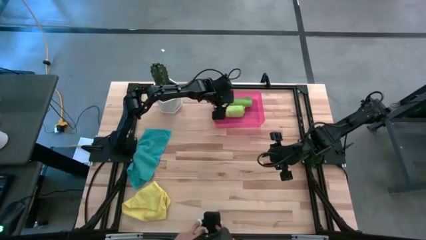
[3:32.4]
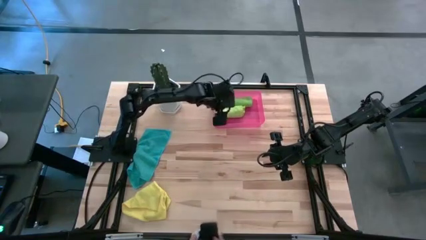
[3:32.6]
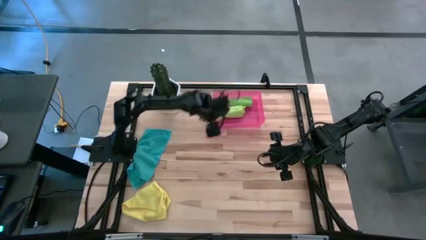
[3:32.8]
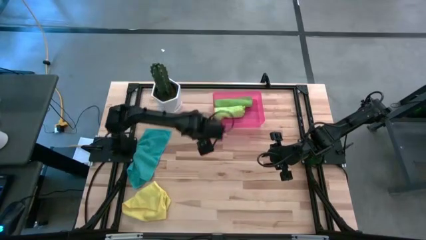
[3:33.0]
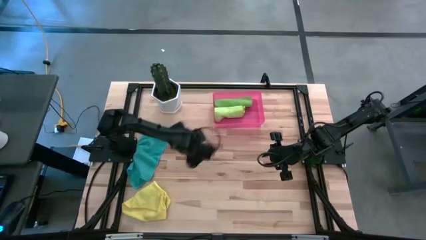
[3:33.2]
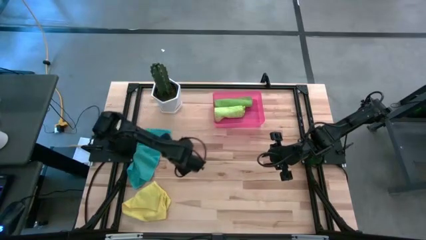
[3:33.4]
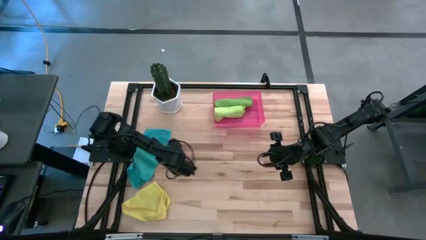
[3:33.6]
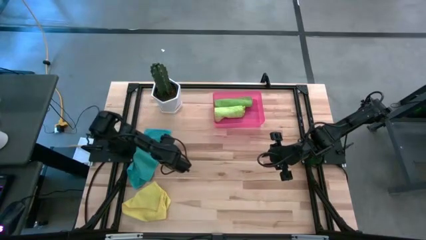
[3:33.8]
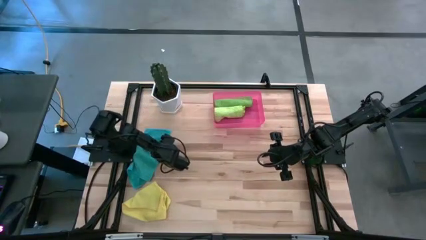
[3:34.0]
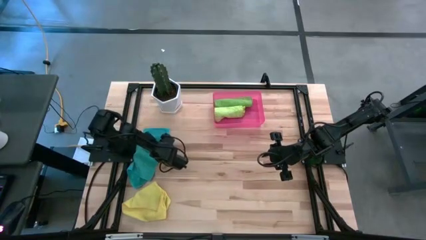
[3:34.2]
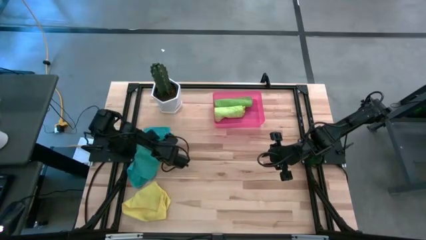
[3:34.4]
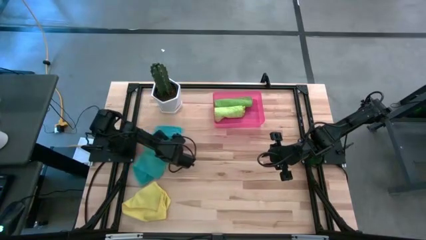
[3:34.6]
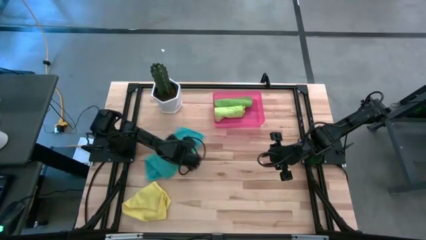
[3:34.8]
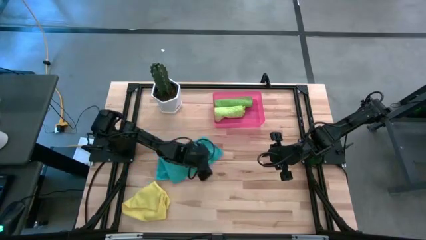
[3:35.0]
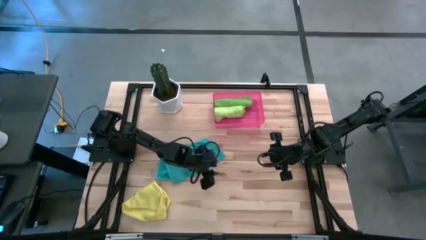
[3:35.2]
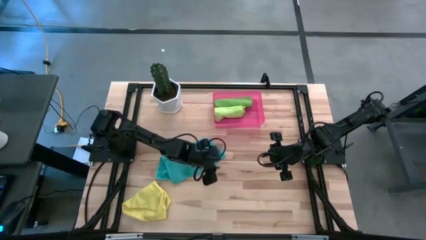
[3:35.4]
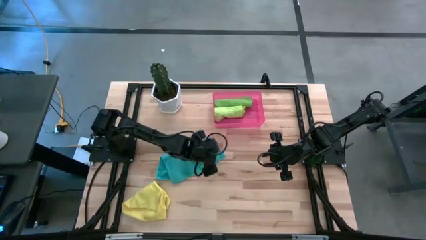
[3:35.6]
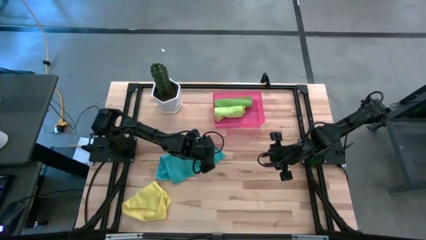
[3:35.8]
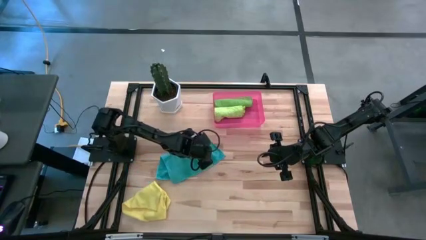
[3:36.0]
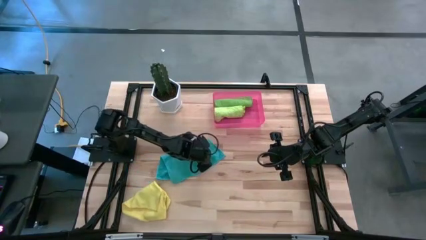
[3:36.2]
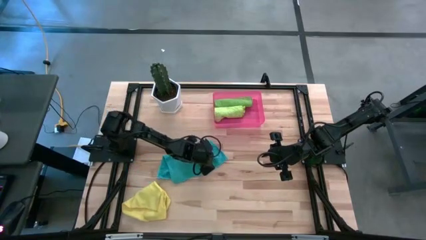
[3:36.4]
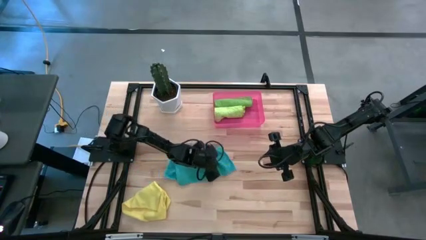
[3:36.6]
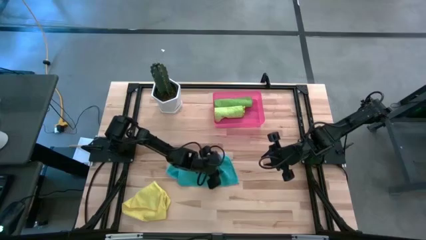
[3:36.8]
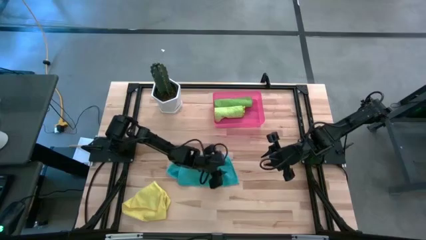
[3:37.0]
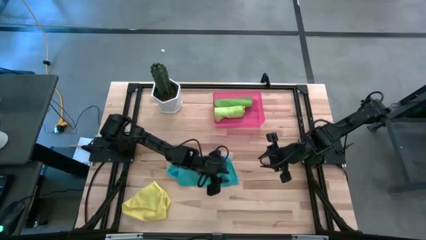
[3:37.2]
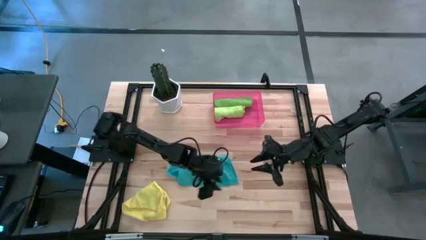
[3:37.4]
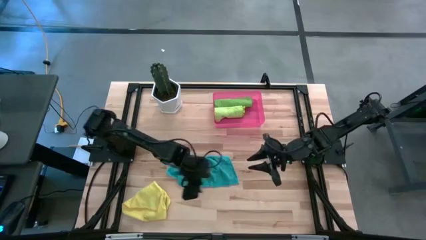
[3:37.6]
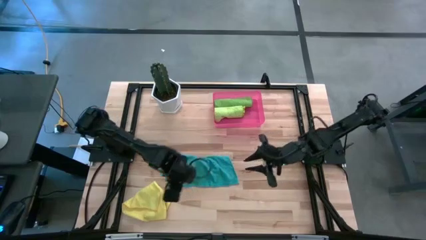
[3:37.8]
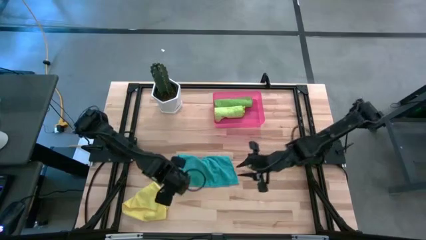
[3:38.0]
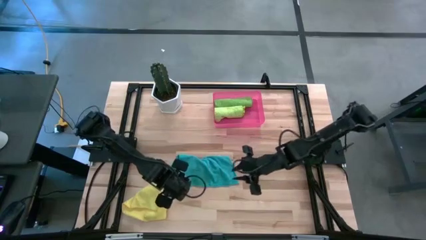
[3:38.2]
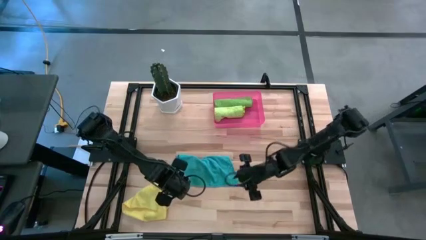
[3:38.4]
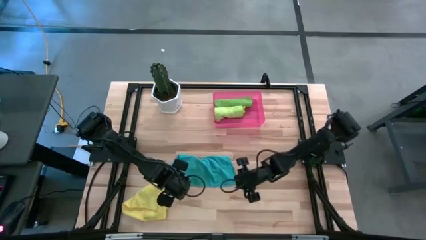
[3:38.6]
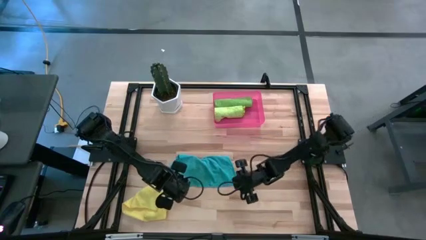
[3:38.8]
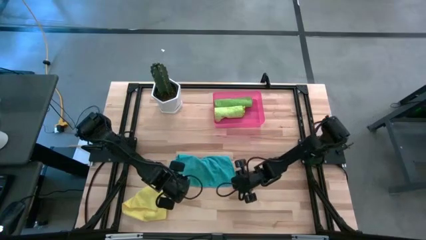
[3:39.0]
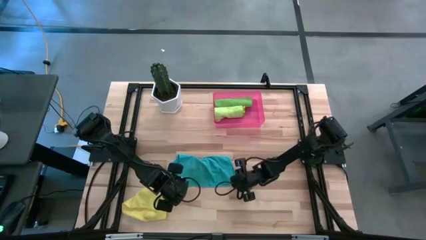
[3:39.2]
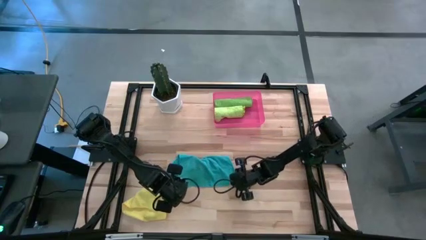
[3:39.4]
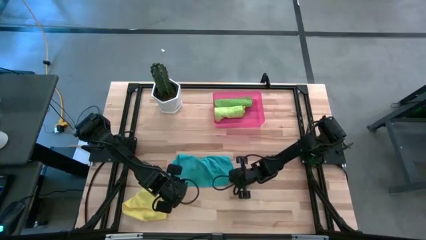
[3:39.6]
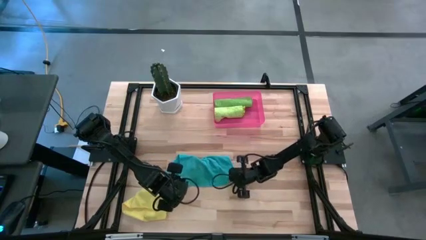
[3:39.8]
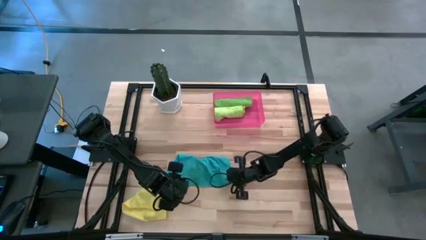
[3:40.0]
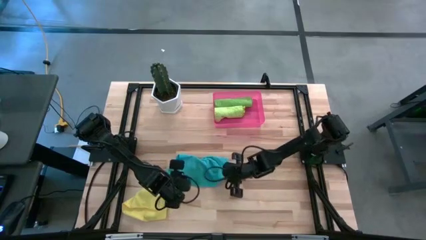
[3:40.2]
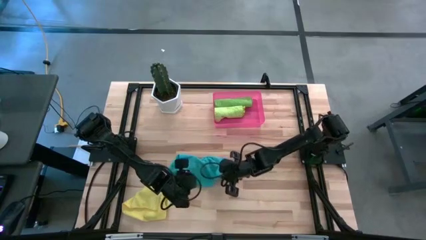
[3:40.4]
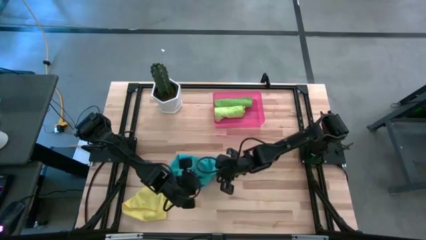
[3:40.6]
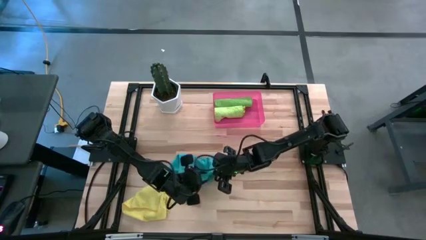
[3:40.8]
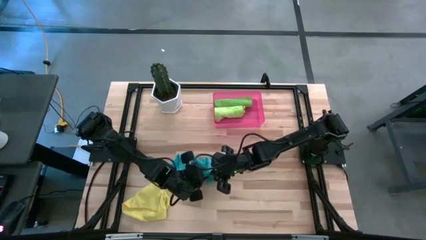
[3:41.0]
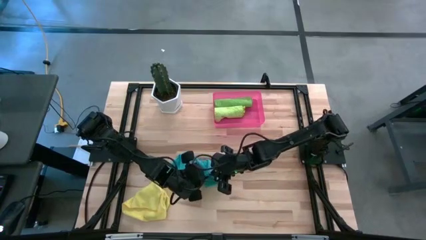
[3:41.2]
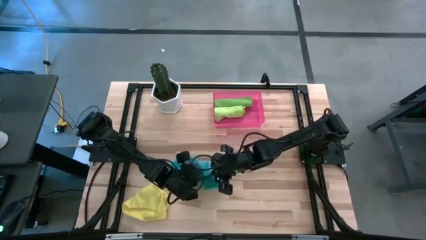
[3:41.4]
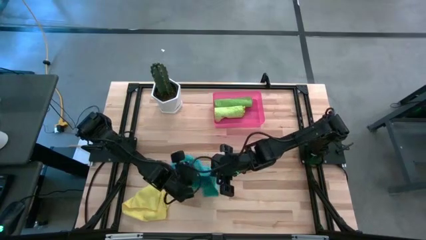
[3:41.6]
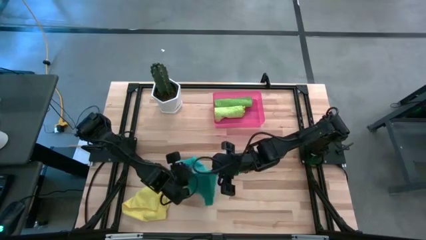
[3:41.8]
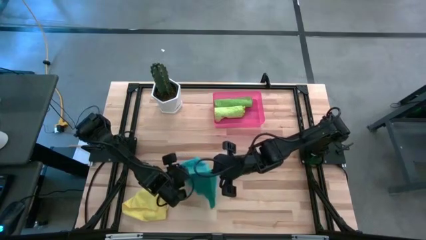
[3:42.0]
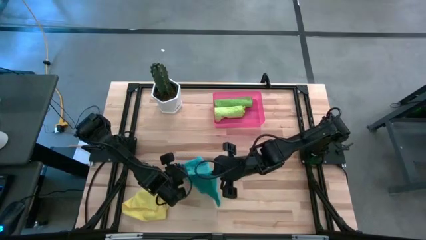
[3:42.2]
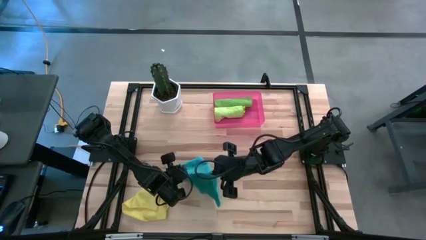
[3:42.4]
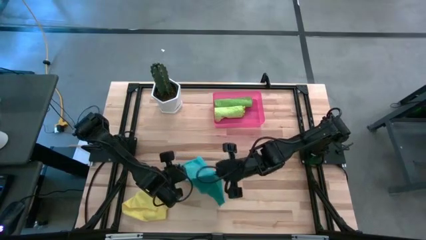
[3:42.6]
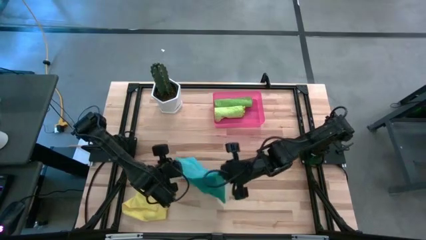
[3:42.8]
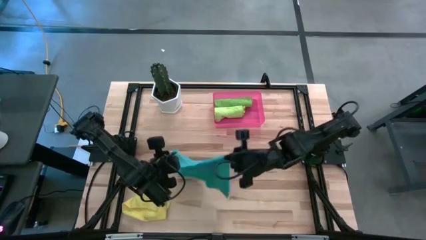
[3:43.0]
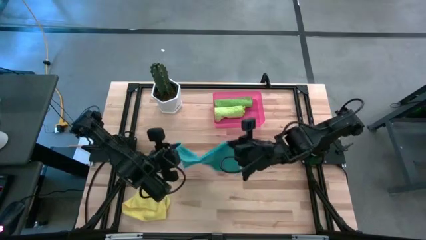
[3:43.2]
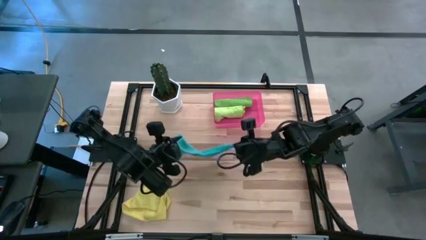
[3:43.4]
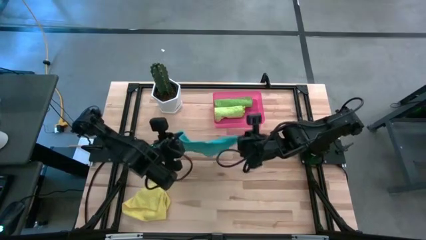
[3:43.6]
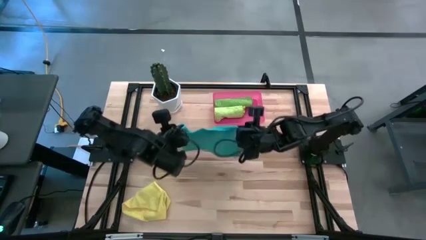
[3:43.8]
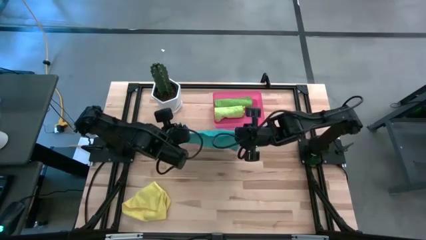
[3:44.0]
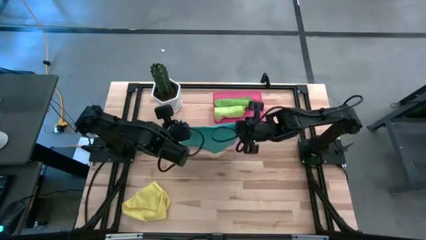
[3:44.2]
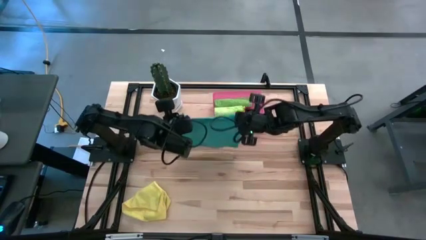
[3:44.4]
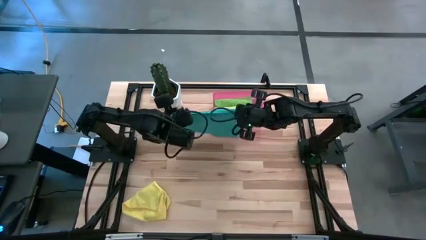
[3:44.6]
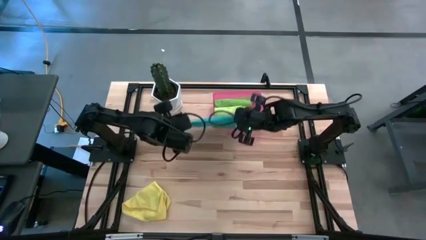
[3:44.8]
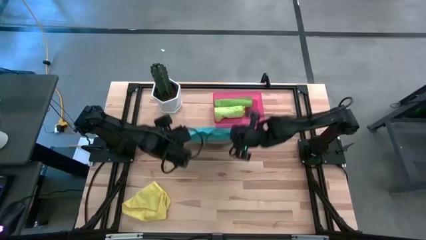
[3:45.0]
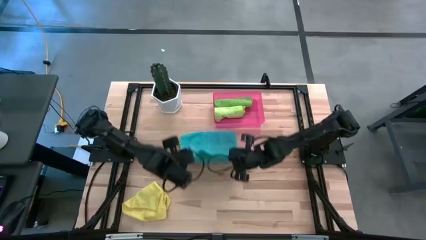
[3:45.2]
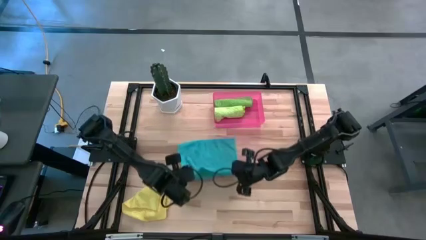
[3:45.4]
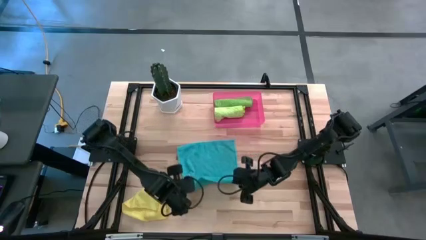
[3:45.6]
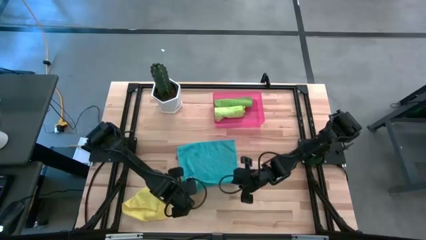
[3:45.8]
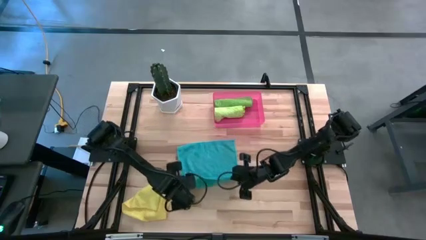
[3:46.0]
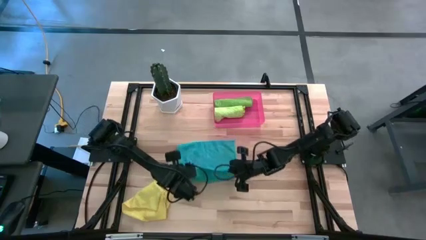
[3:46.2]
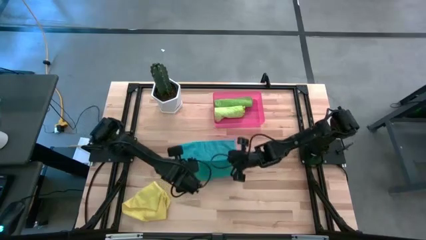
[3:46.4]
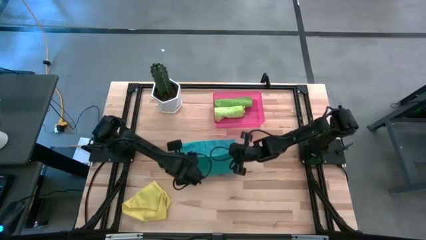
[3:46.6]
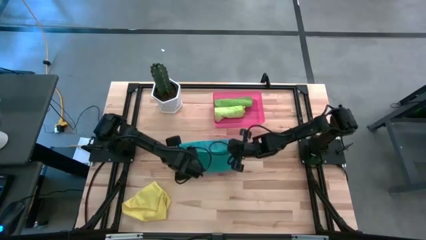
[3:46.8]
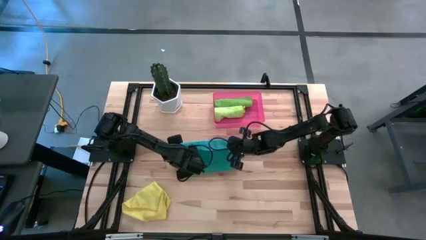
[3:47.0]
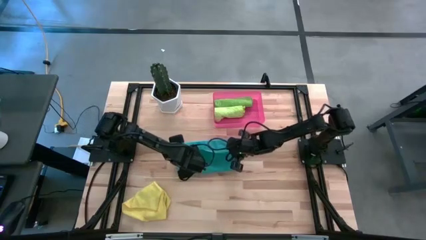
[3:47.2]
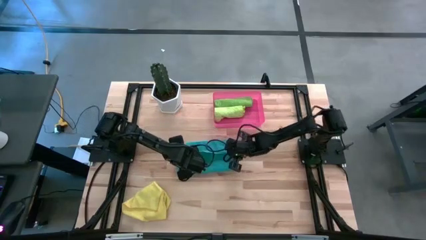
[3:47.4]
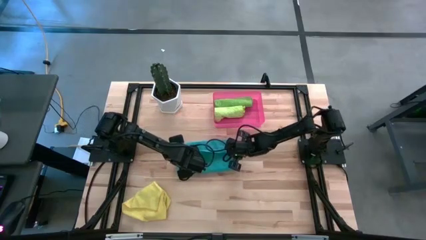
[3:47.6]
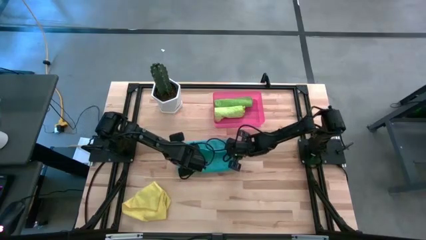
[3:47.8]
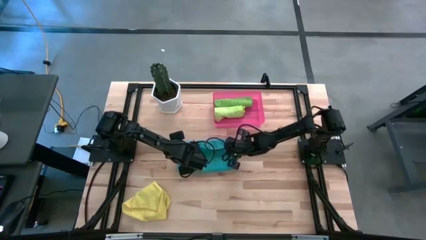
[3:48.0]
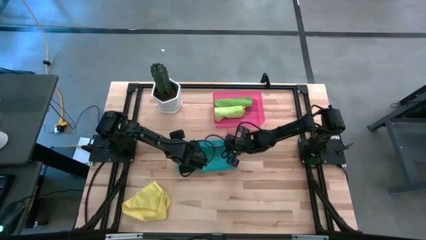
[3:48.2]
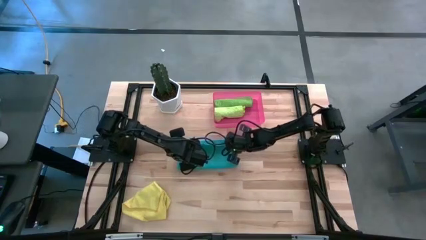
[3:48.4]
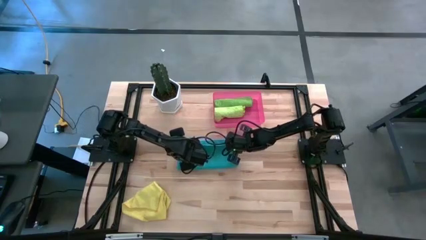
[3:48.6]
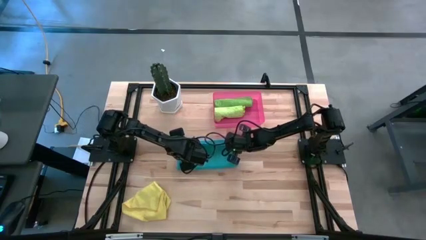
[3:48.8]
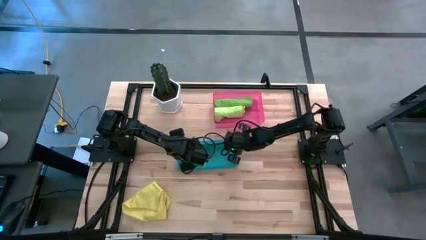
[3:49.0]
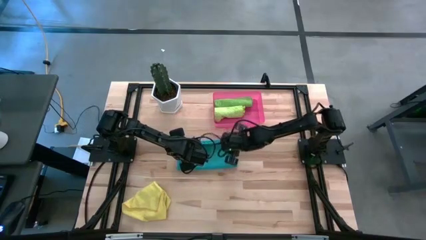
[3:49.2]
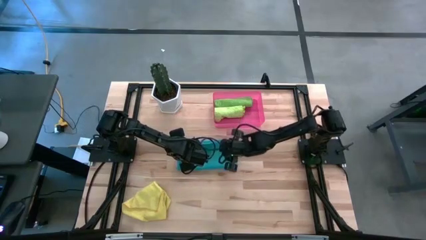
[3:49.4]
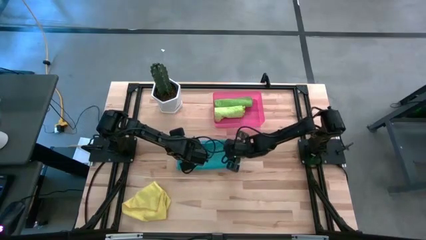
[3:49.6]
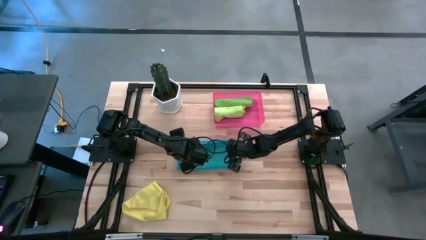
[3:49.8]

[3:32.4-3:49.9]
Task: Roll microfiber towels into tight, uniform cylinder then place into a basket
Roll the blue microfiber cloth
